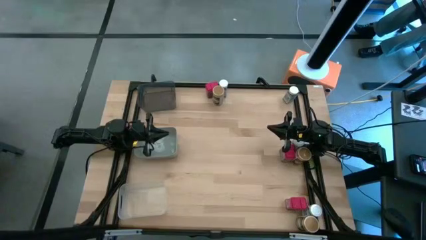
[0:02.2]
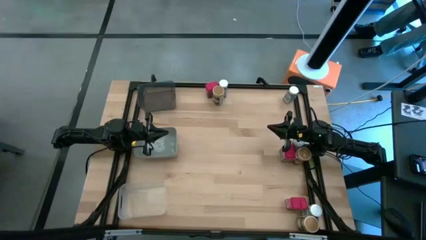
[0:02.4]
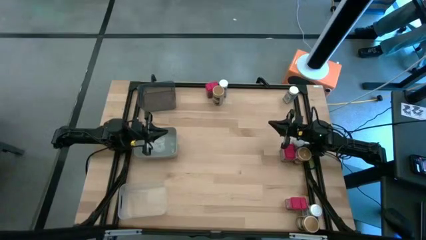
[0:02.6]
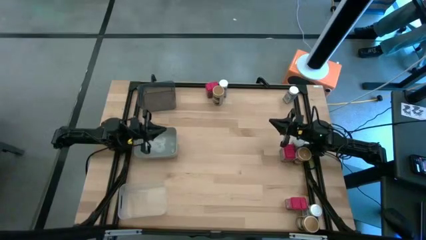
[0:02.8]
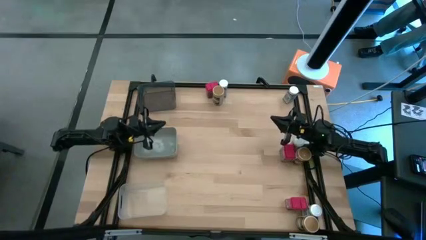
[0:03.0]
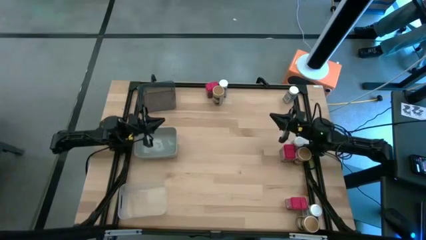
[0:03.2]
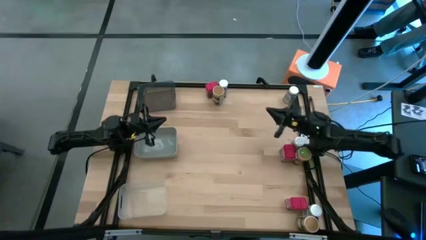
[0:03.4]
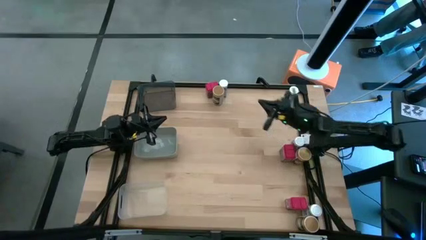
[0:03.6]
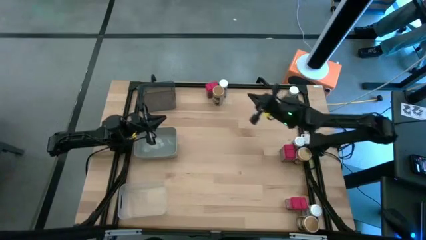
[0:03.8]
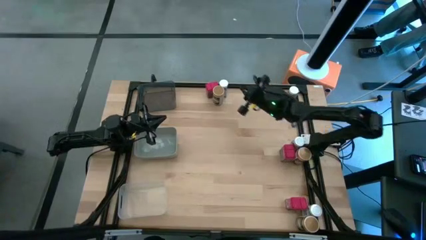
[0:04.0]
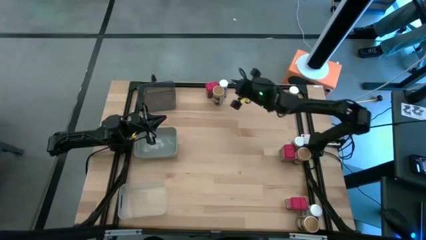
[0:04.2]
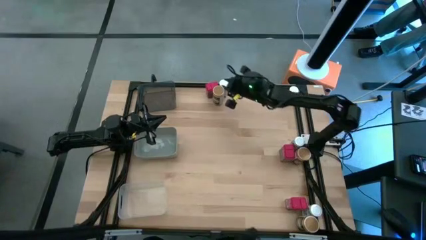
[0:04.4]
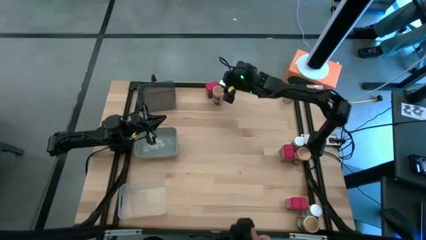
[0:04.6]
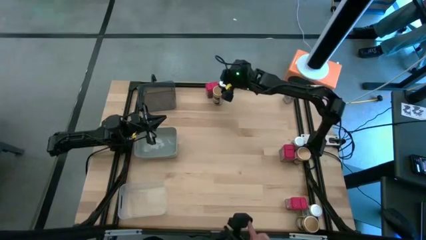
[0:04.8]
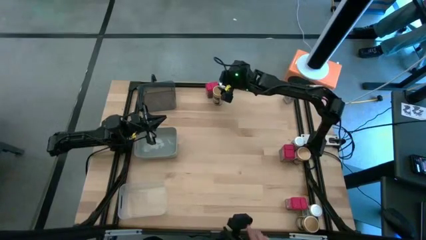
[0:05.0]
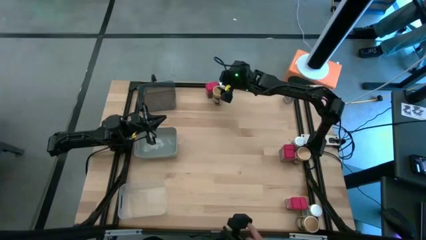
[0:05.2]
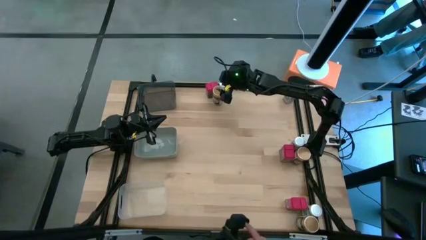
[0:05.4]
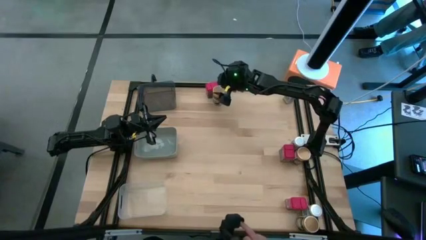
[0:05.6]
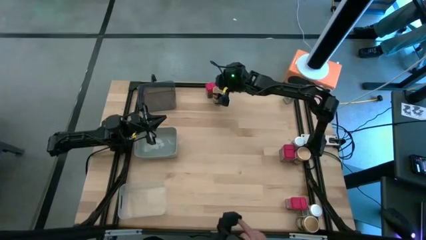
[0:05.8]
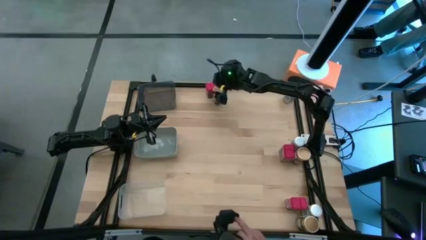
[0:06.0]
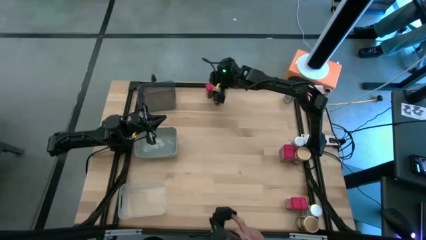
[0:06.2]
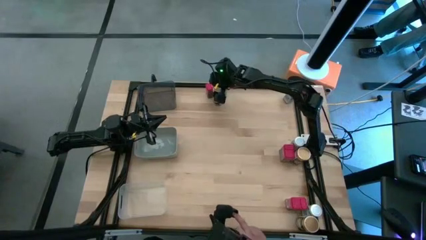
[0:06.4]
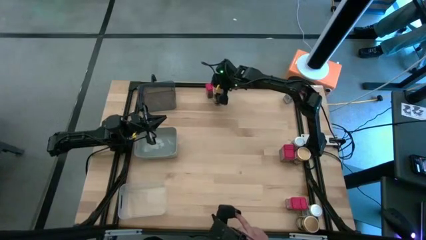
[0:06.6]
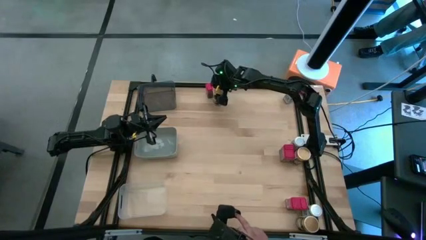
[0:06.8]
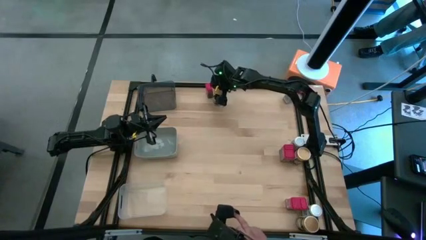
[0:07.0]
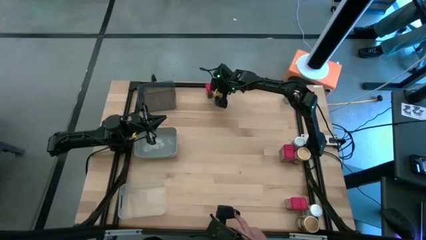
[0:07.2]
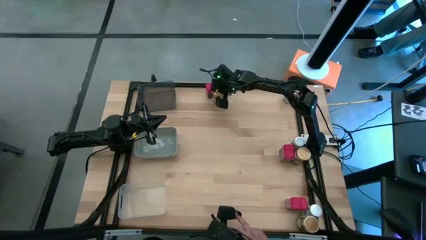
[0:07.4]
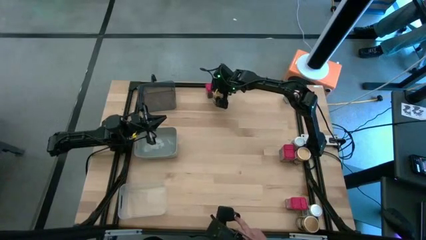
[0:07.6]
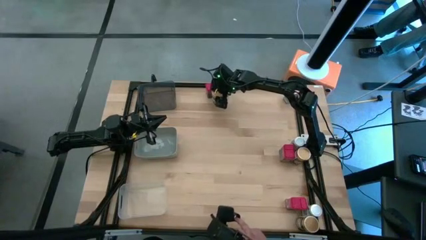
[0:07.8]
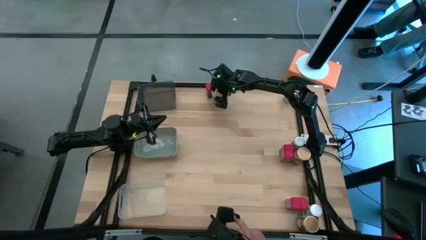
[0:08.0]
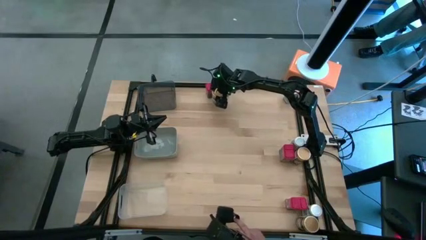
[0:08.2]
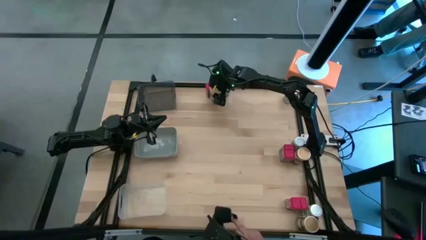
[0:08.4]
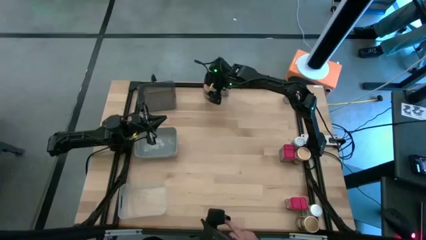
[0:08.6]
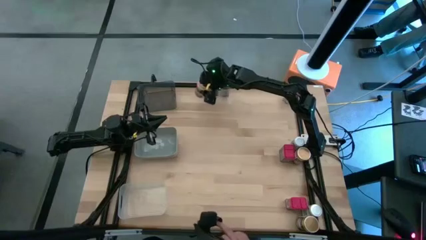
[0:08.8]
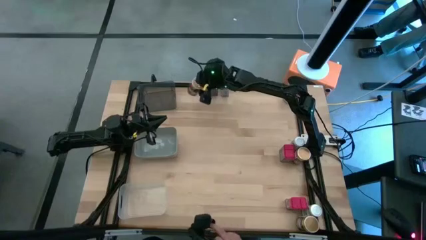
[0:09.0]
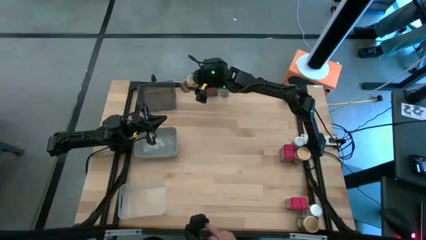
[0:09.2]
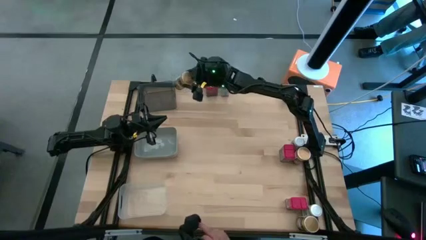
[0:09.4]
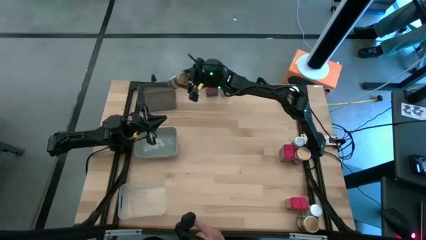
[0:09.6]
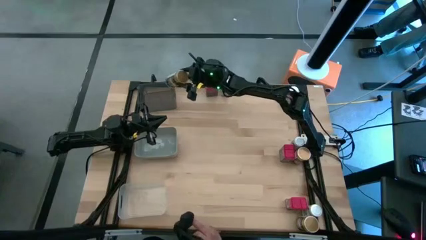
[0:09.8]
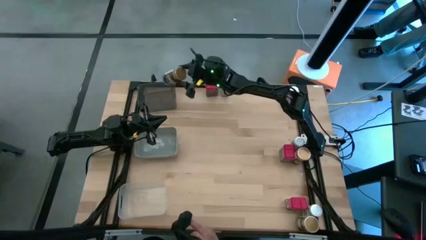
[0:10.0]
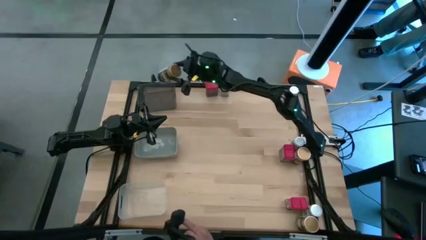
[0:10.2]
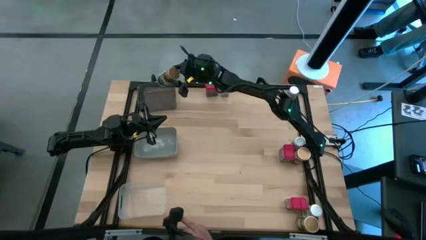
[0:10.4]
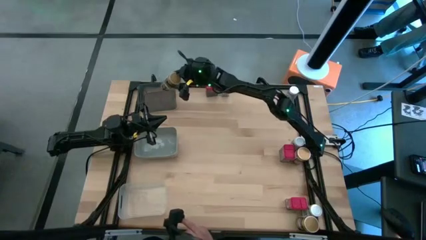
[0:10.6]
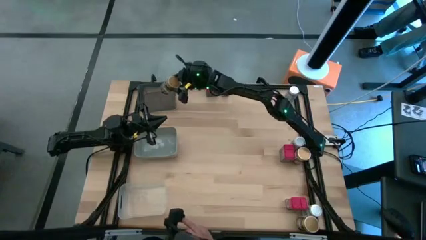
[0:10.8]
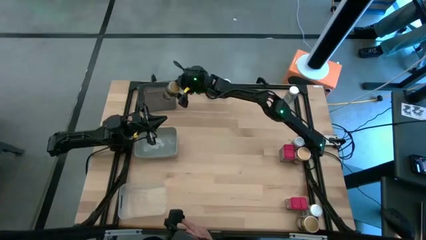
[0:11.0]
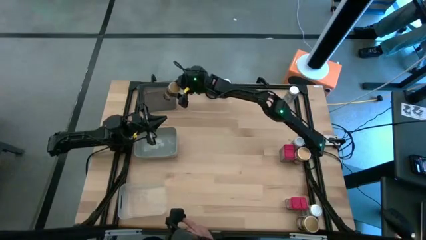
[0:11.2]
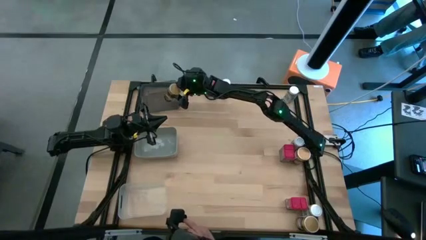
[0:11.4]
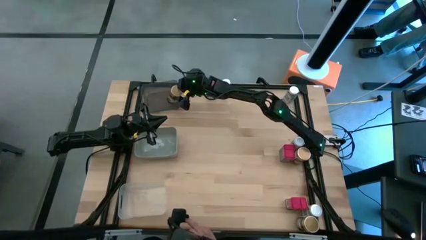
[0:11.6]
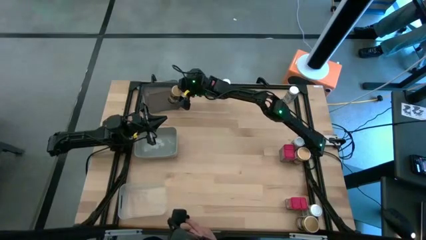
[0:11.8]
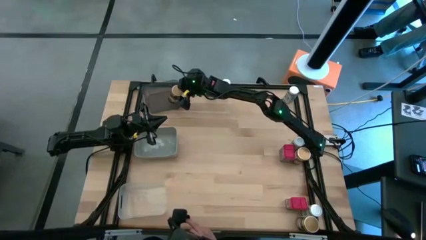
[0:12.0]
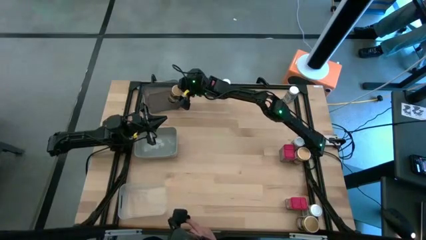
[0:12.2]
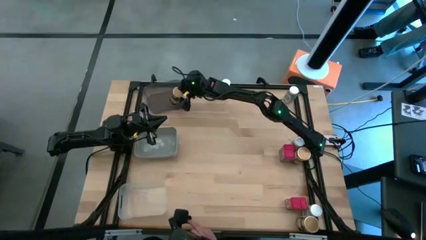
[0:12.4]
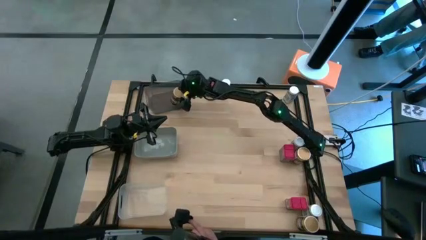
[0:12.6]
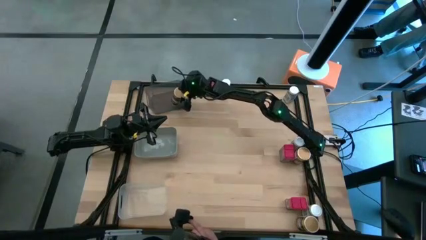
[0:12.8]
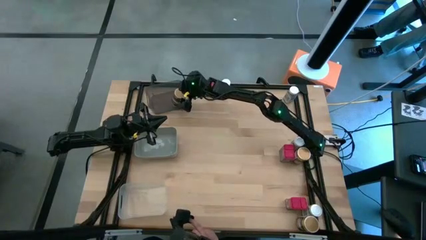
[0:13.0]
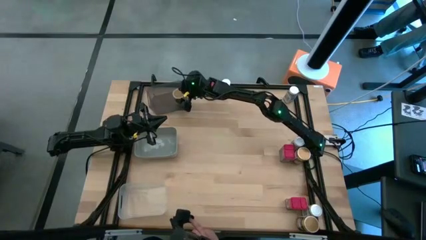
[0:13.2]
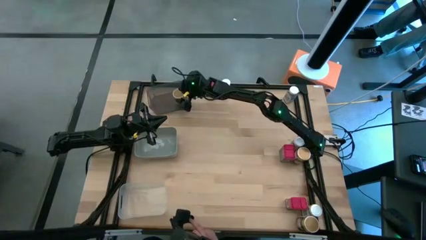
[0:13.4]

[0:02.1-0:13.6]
Task: Sort spices by type
Put the top left gold seasoning bottle into the black transparent bin
